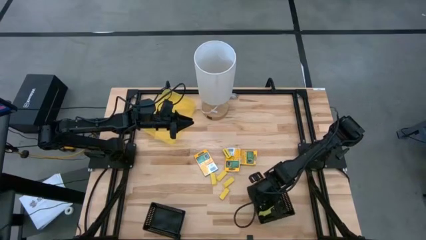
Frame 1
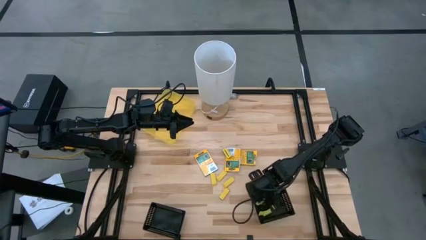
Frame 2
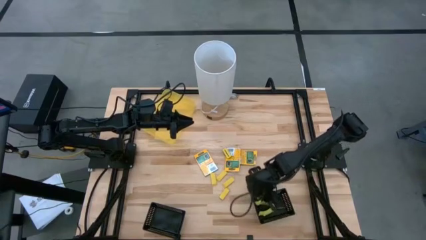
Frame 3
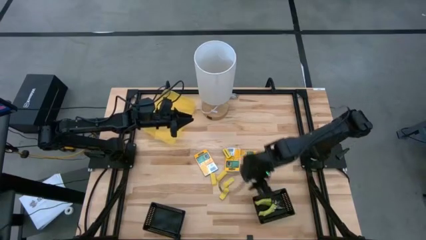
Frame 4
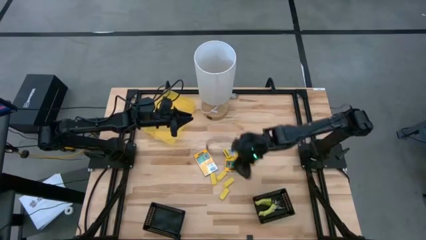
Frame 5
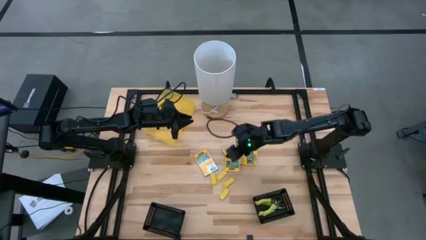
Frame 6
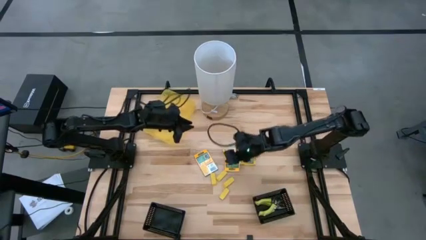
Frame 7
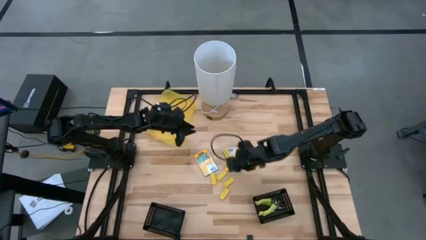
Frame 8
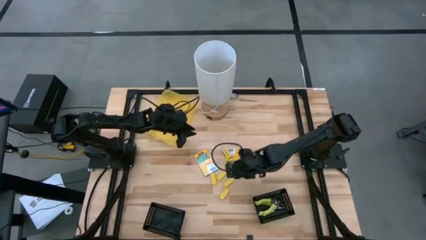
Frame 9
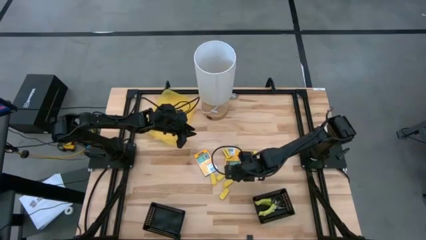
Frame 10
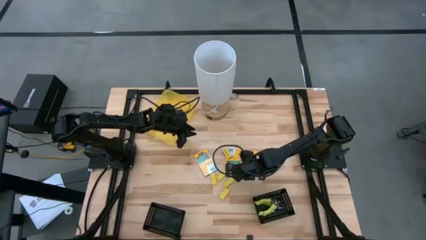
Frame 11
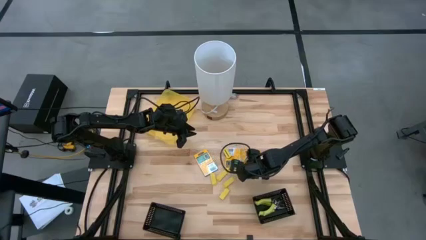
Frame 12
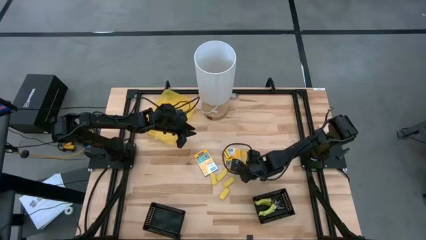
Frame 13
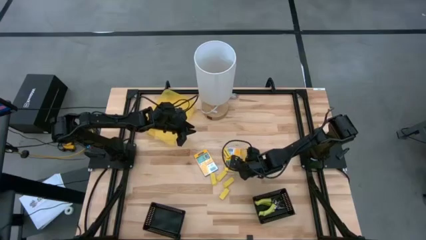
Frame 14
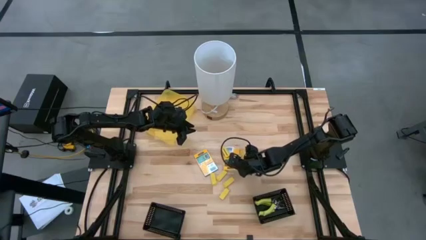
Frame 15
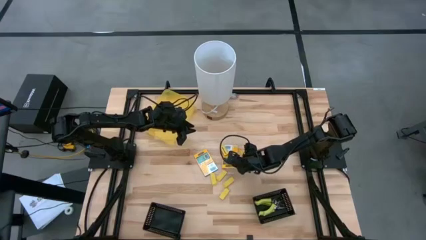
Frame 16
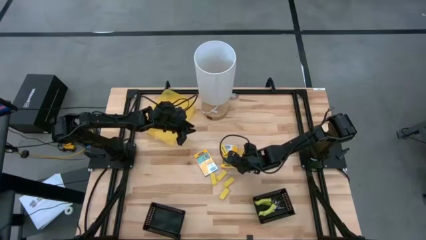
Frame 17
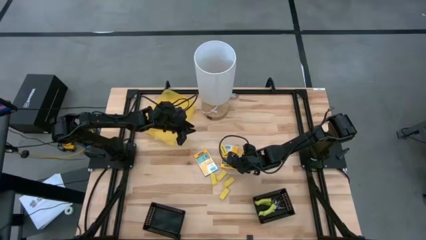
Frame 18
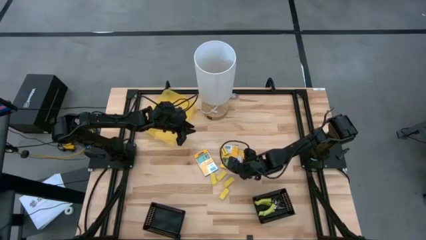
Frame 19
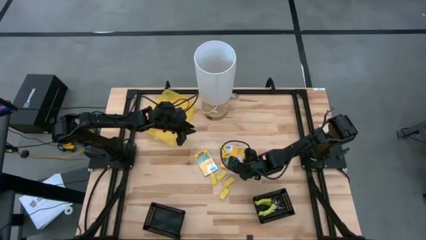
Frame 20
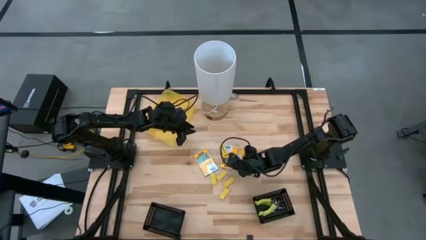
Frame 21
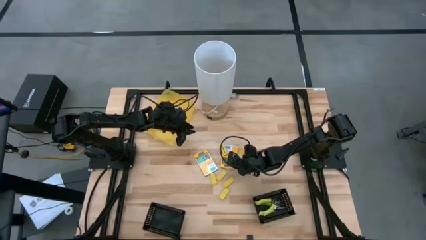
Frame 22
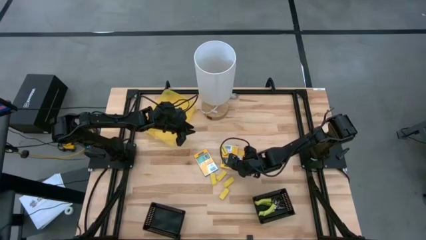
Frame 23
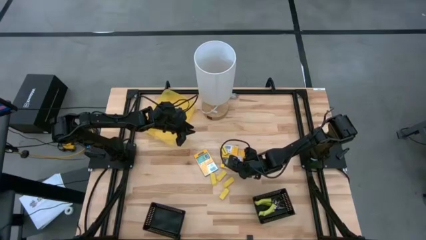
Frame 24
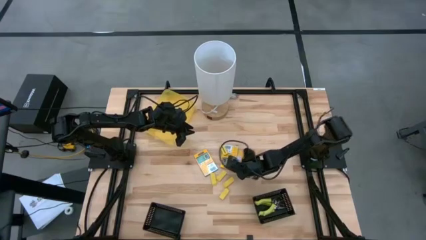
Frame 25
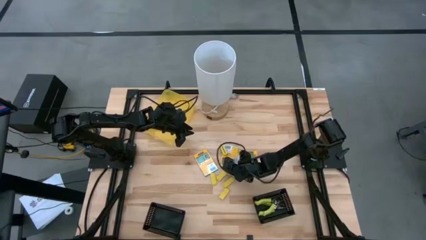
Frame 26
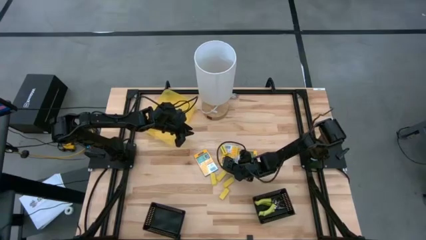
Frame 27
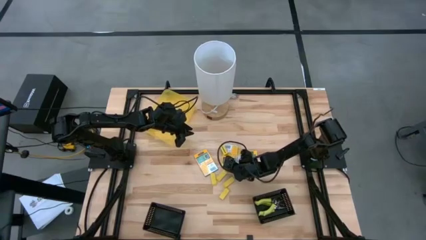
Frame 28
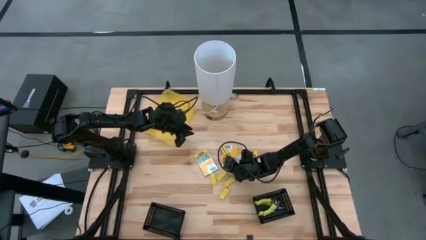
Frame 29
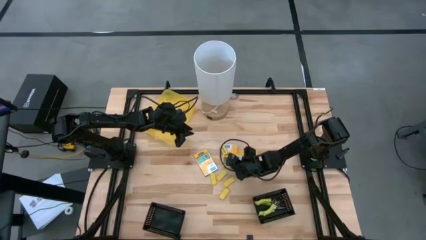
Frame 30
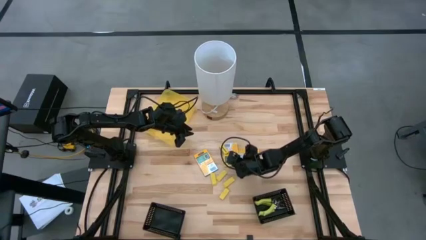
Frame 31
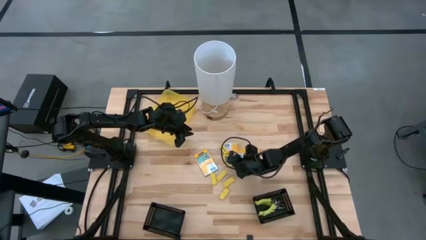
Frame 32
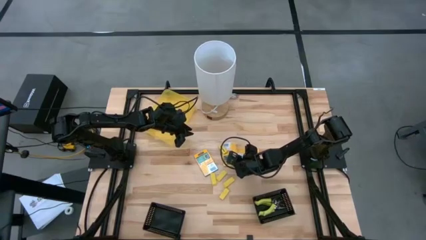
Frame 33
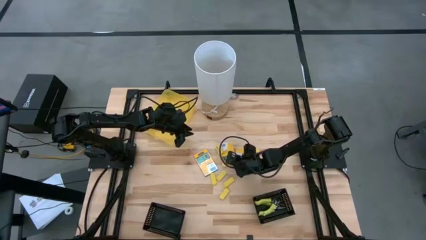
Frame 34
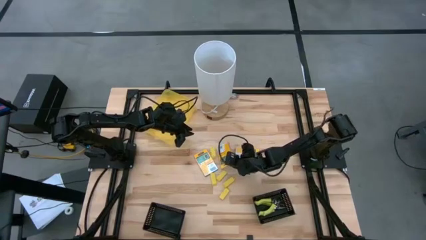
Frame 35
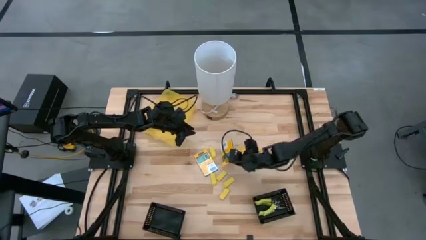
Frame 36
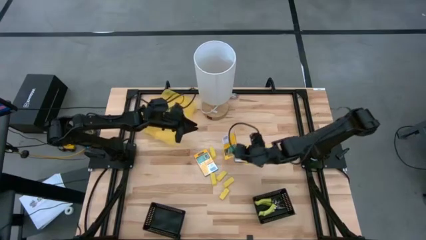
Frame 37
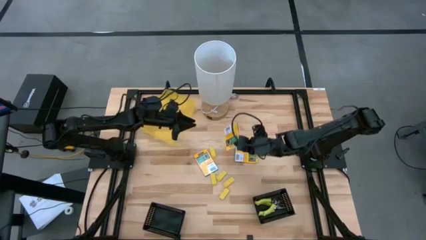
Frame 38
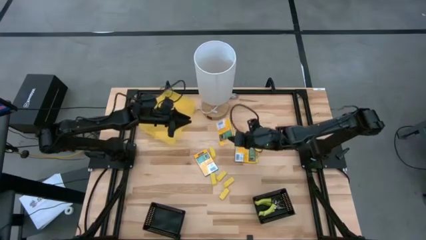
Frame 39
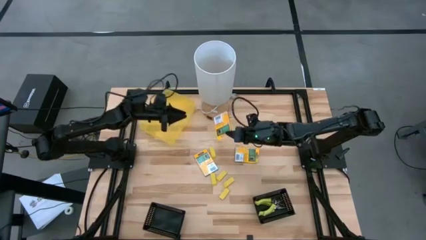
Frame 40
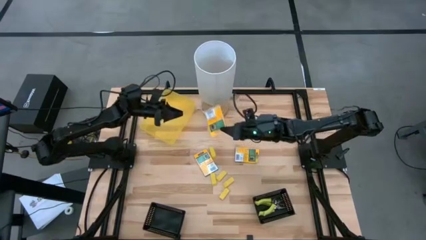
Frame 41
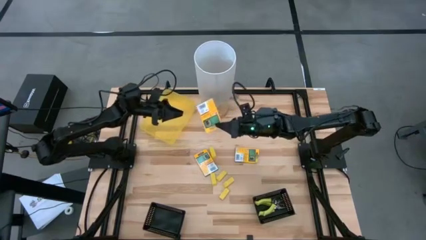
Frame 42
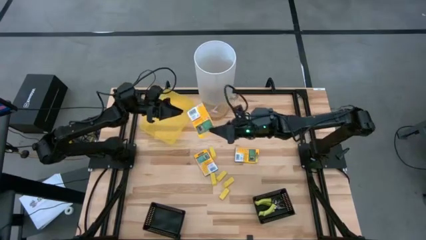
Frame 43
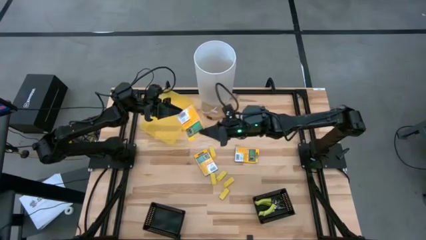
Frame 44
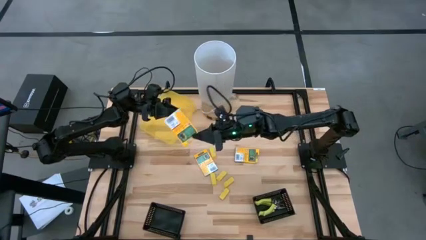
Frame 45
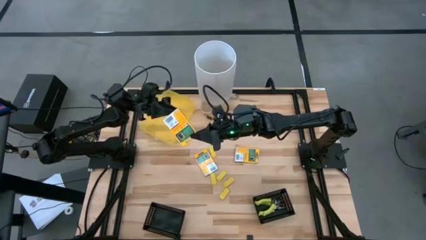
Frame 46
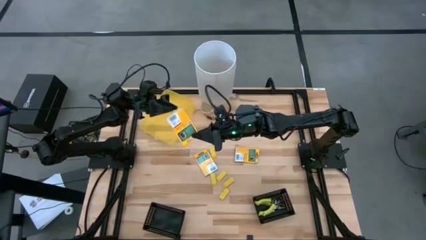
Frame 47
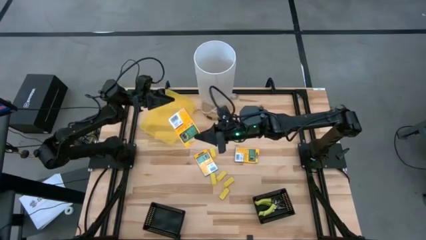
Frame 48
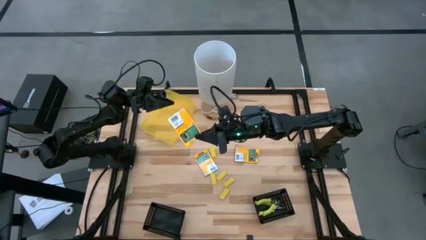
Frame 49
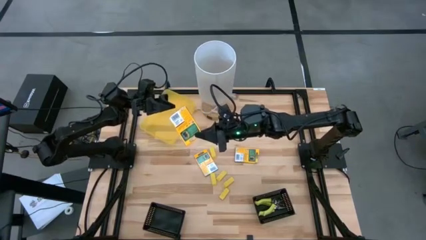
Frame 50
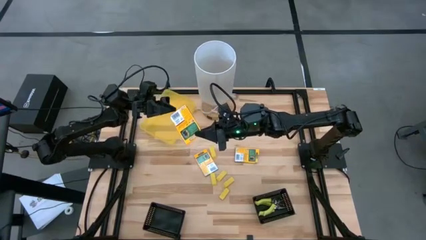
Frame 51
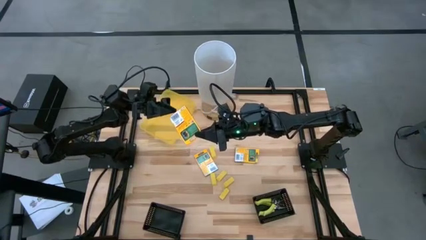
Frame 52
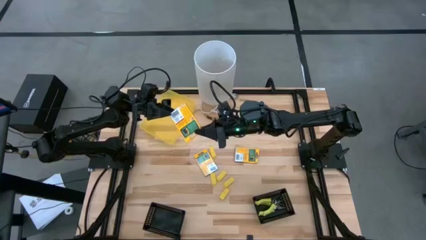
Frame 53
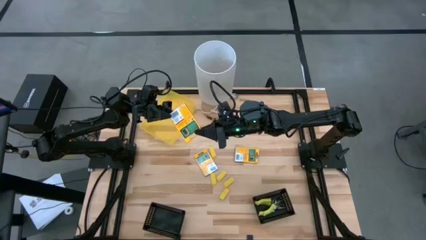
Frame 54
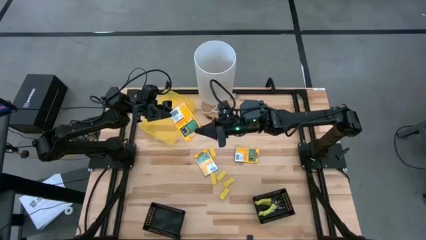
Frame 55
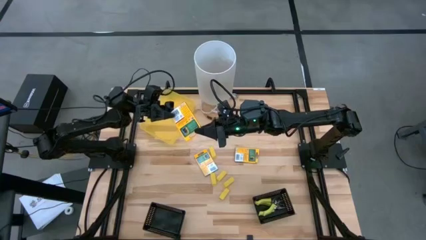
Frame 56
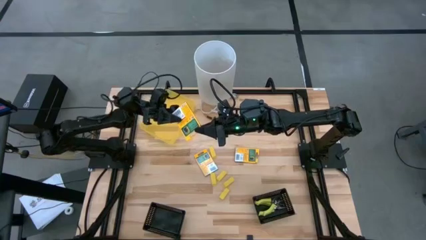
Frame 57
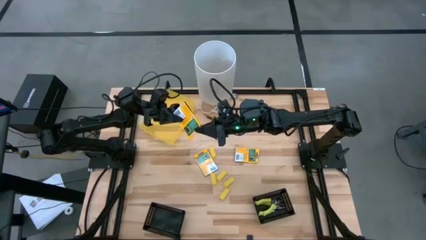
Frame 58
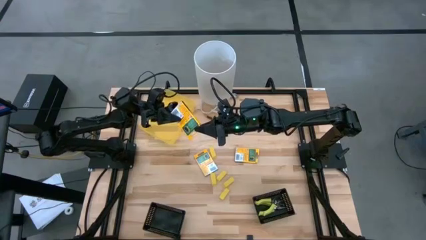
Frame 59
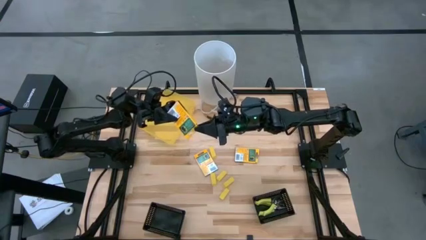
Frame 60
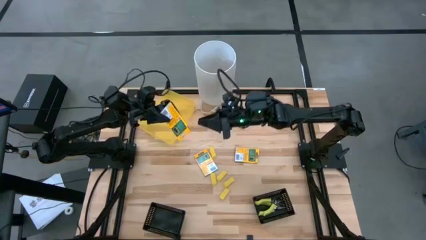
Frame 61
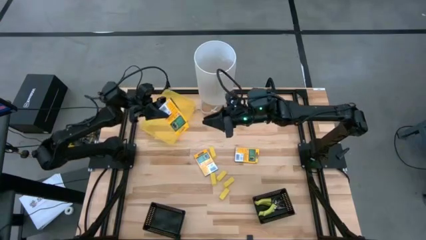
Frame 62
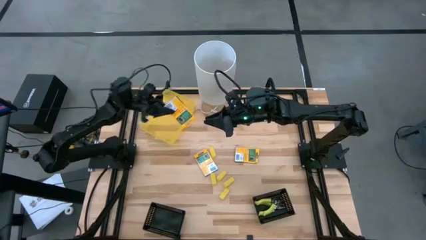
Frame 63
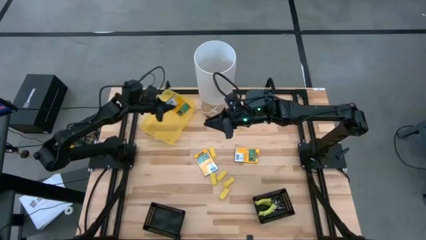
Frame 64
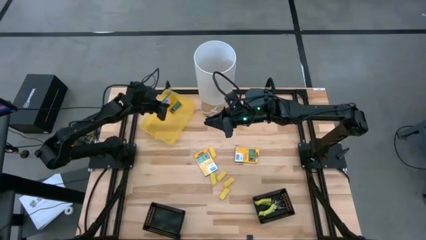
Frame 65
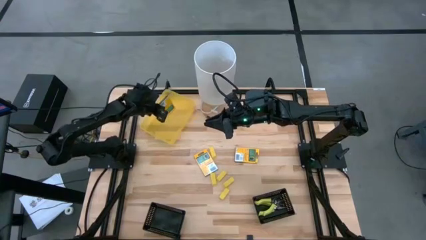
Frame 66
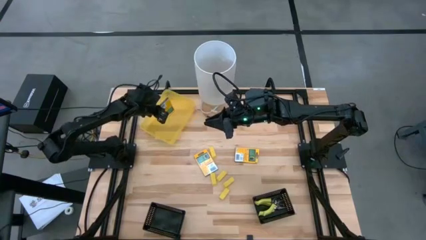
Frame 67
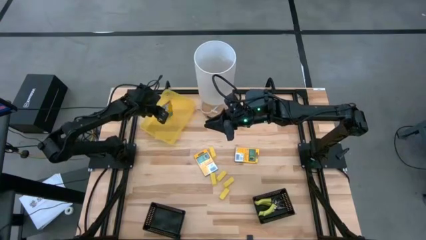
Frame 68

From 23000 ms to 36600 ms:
Task: Pick & Place School Supplies
Put the crayon box into the yellow bin
